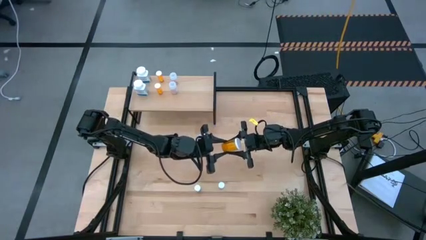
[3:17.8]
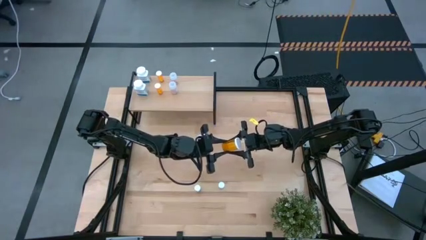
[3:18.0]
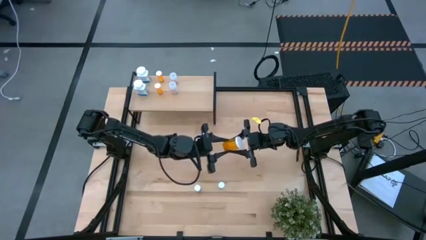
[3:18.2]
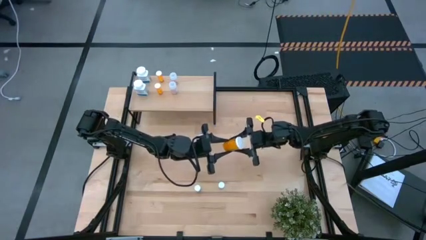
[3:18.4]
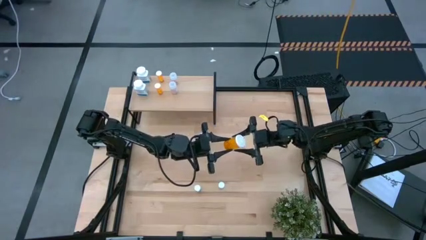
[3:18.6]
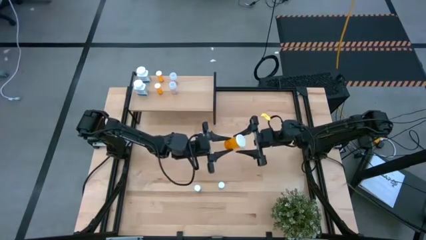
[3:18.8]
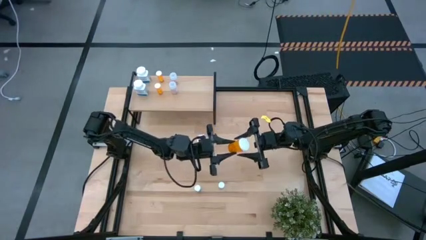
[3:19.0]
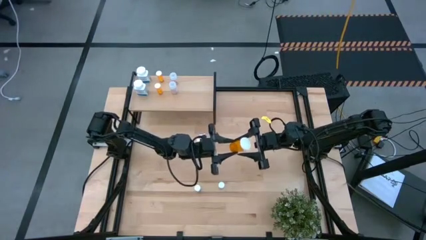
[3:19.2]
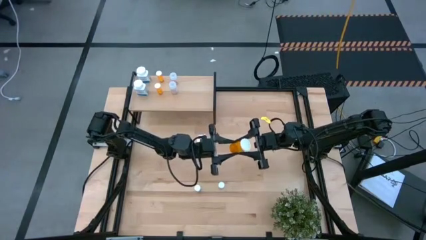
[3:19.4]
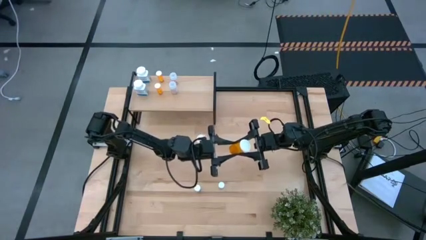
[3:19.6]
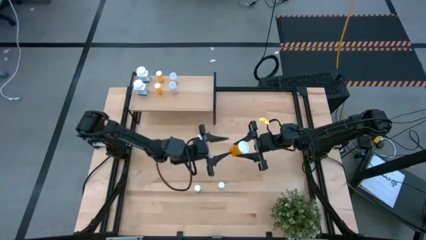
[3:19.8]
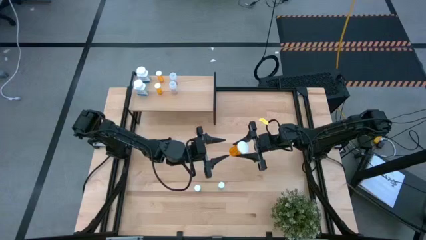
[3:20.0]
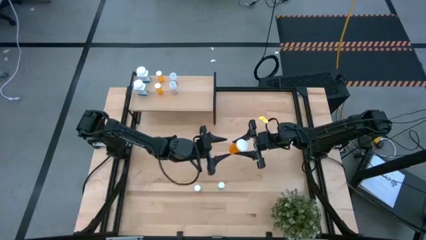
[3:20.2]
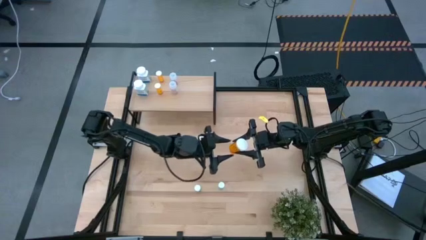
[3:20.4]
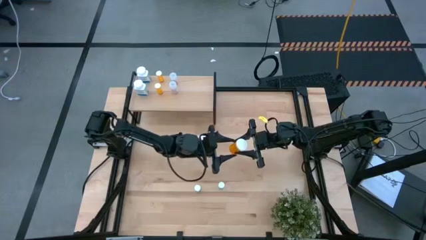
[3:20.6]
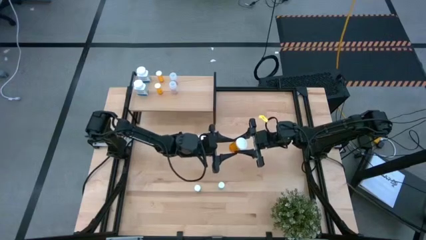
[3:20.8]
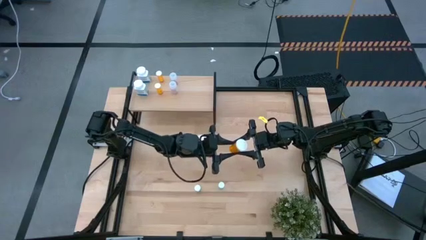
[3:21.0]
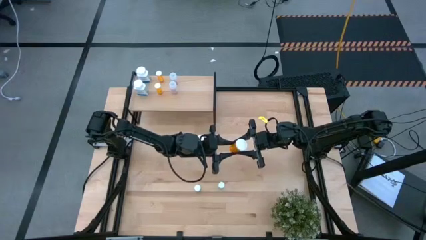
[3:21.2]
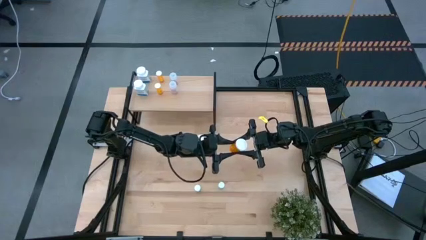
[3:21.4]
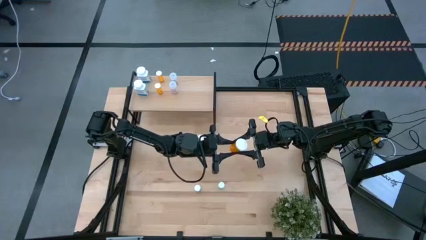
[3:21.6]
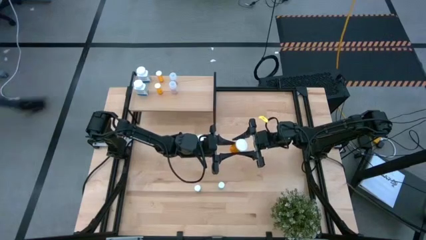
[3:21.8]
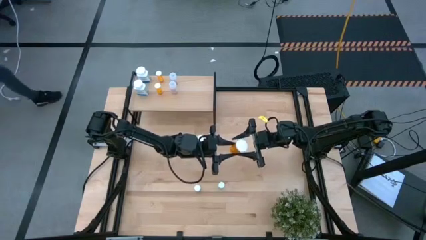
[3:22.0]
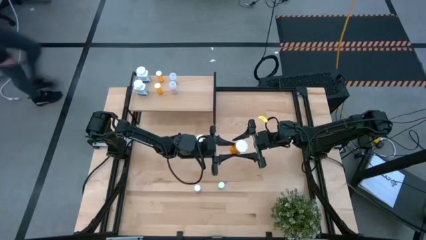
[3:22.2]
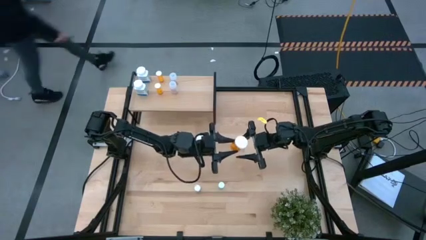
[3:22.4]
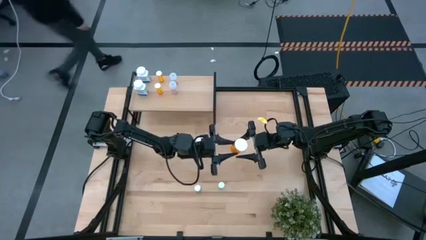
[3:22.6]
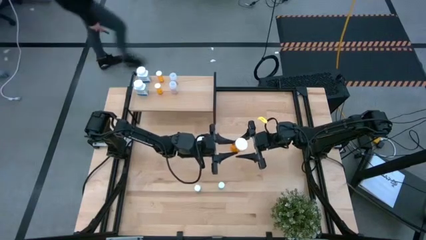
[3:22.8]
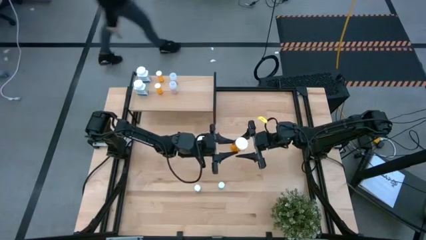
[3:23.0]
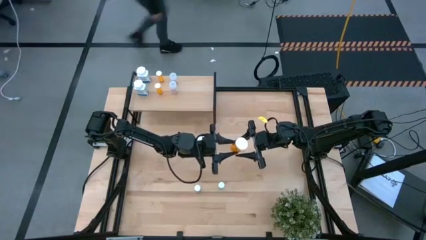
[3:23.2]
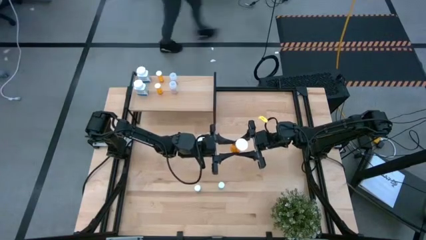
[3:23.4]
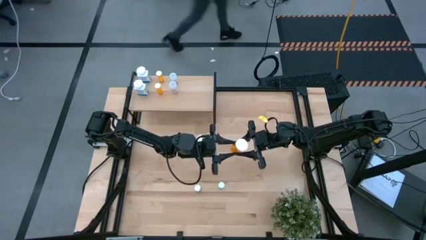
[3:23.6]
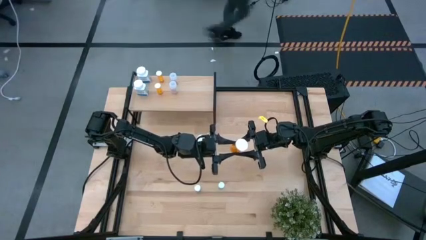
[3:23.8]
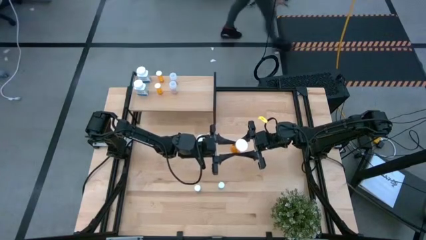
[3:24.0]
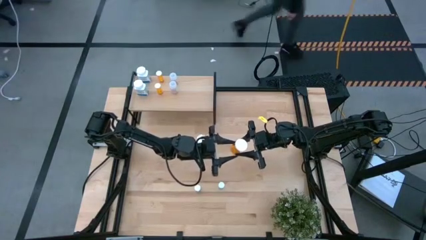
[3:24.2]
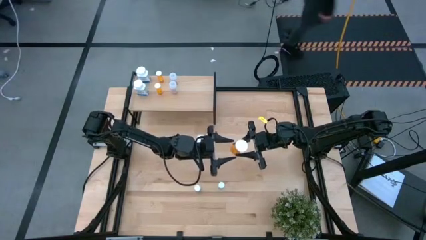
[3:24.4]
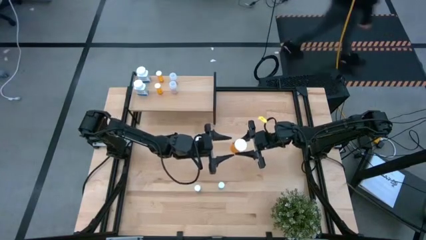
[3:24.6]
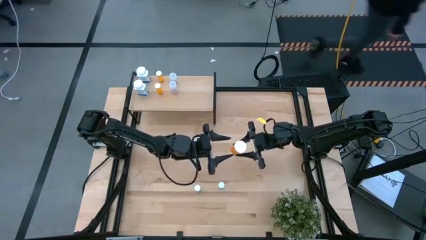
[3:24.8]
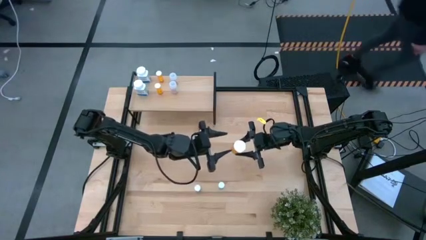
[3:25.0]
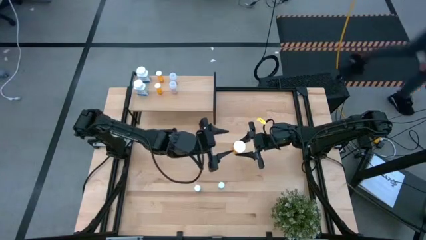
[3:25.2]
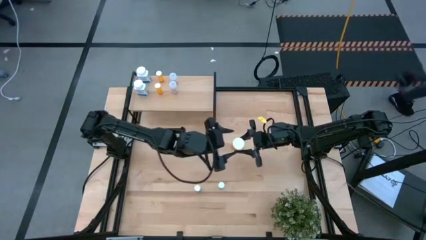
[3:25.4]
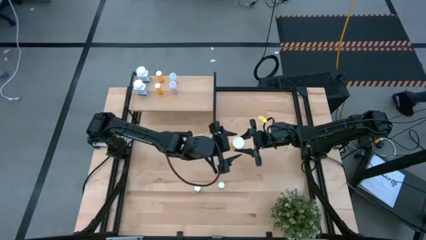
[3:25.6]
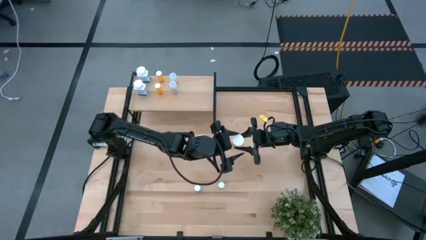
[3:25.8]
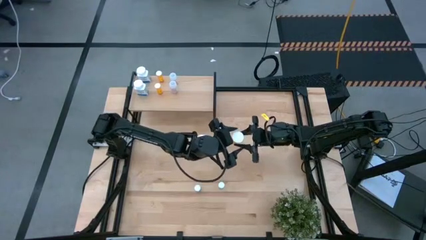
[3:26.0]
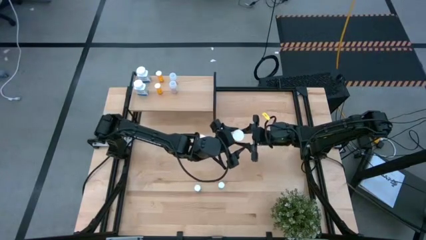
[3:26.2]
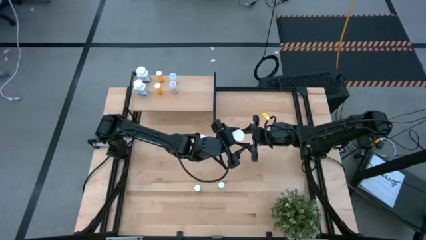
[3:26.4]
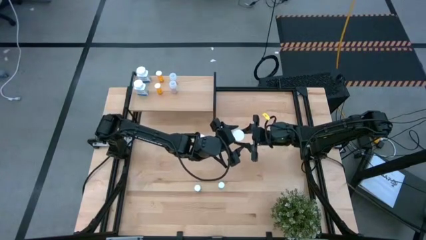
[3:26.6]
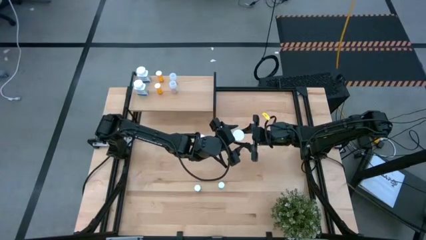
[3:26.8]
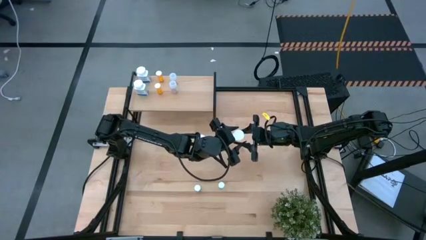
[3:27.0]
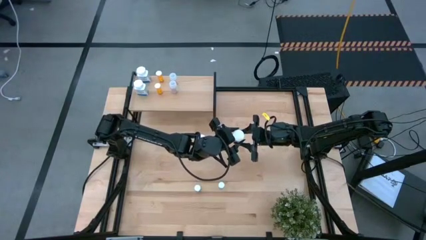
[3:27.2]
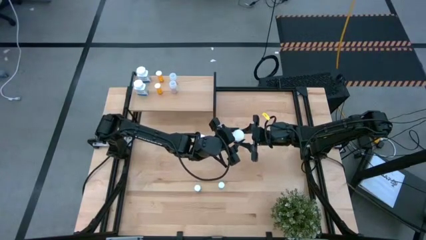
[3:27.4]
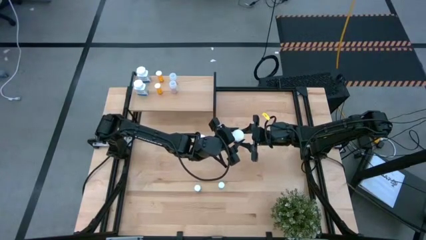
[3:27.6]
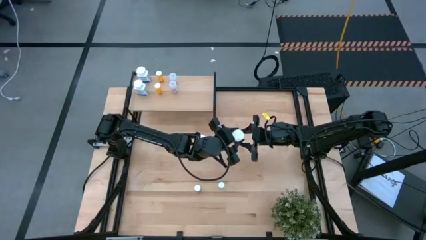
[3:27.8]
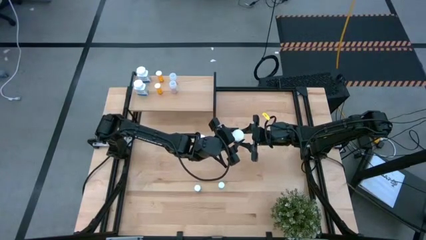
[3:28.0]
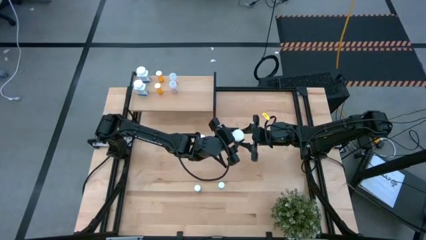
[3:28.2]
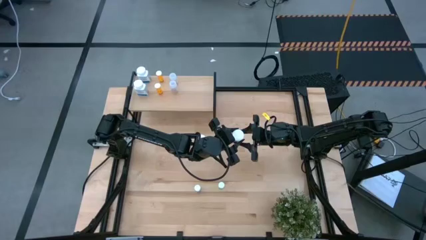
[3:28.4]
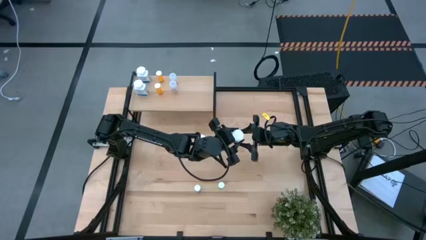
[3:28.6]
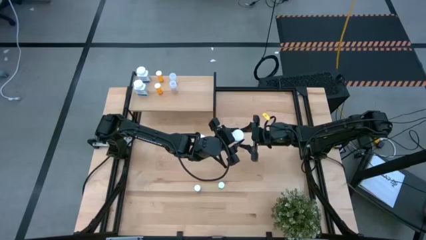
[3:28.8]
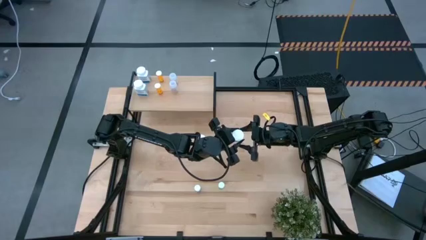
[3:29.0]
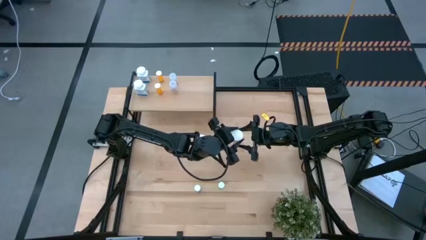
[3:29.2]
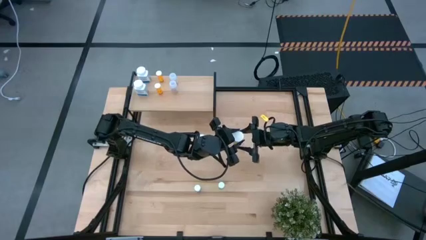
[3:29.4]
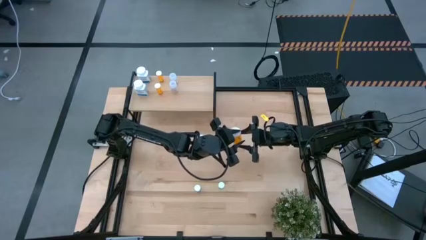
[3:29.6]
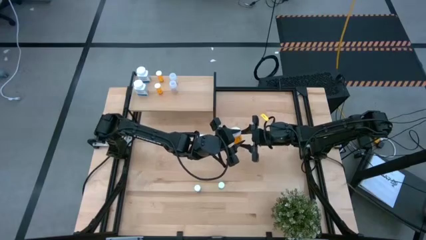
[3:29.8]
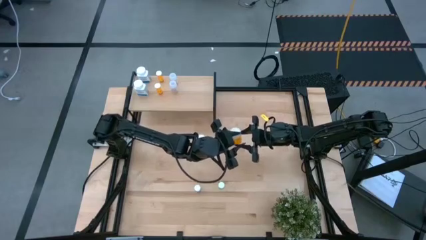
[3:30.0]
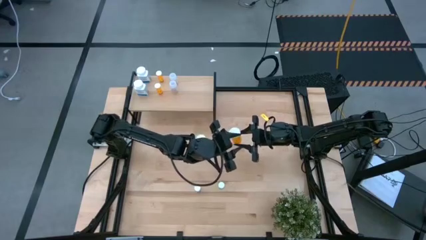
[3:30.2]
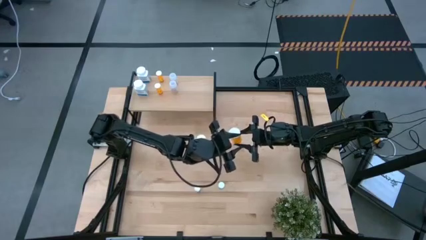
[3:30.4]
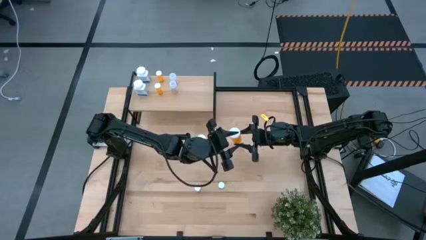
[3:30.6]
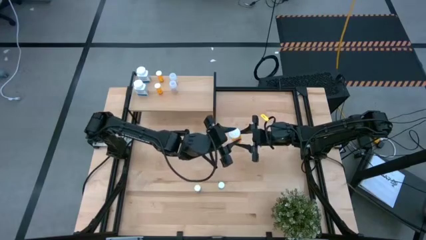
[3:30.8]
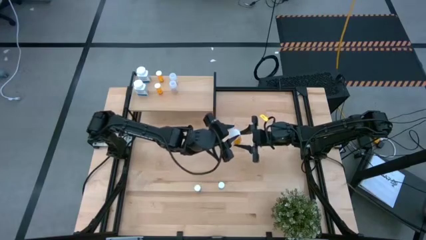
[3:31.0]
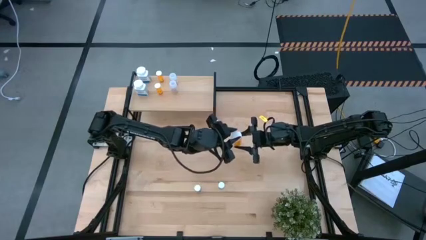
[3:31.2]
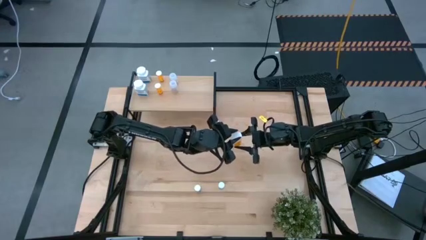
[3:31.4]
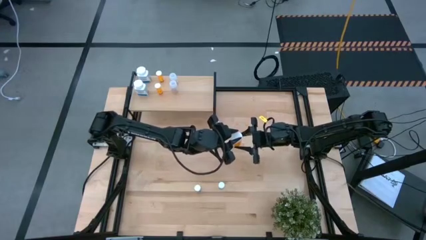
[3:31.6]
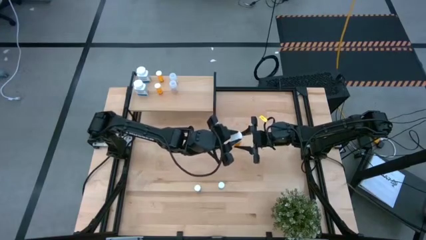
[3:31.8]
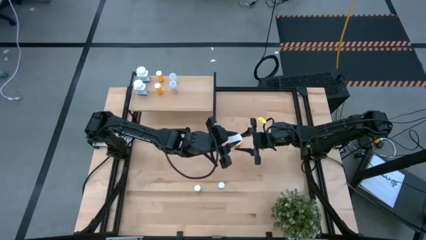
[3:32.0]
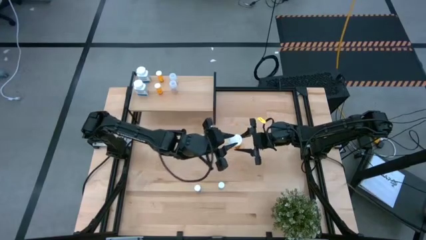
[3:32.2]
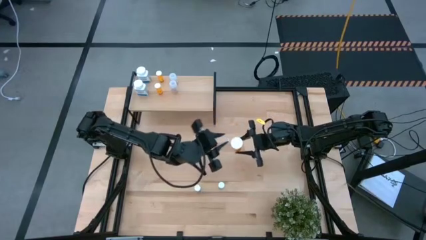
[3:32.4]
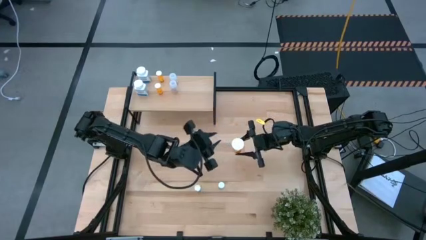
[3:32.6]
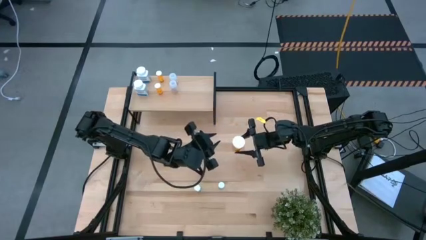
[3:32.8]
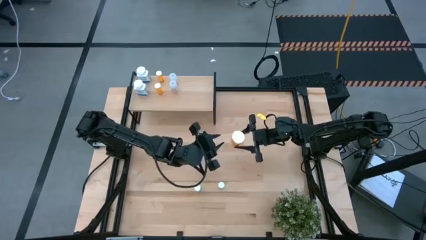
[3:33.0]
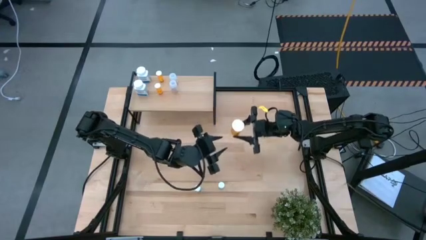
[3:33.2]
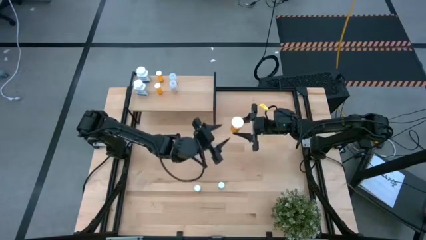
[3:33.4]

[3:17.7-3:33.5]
Task: Pick and place medicine bottles onto shelf by color
Put the bottom large orange pill bottle on the shelf
